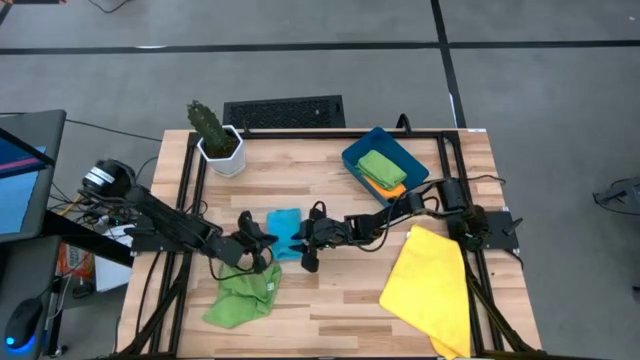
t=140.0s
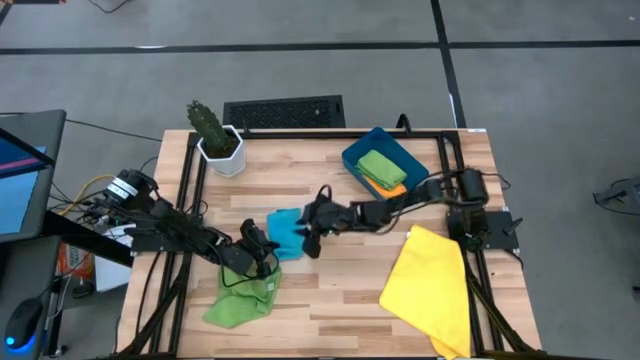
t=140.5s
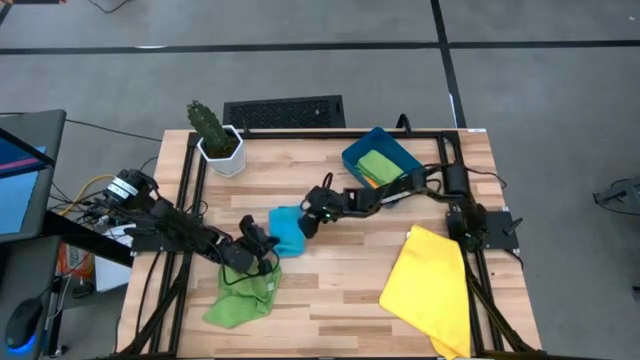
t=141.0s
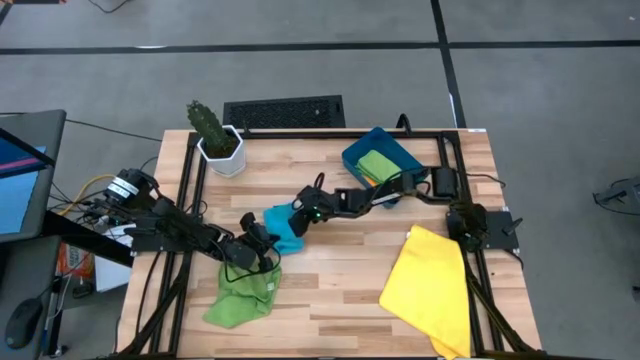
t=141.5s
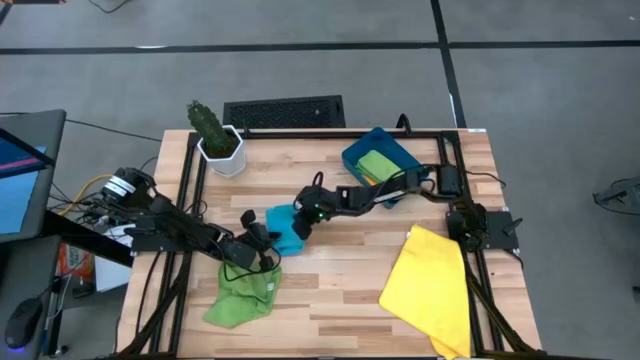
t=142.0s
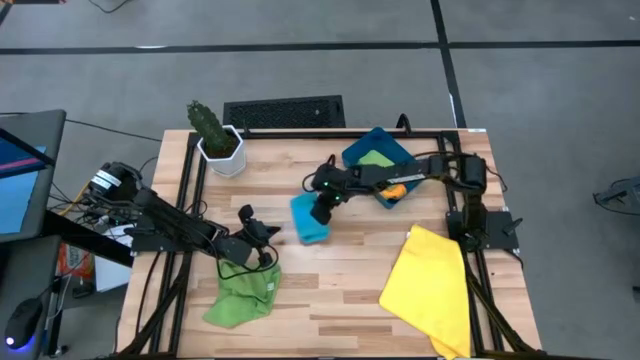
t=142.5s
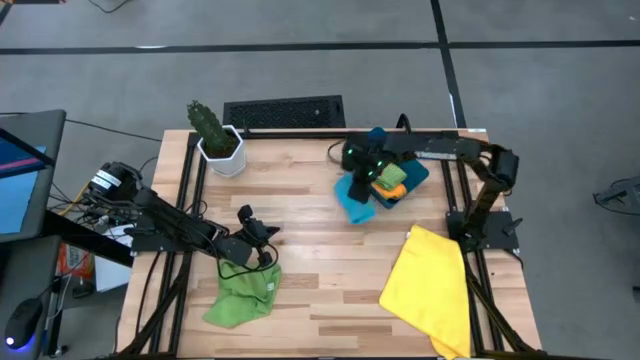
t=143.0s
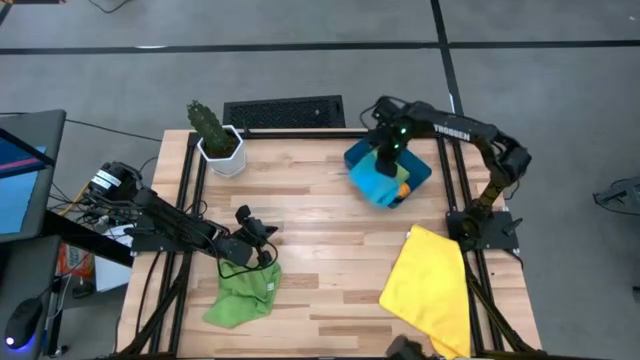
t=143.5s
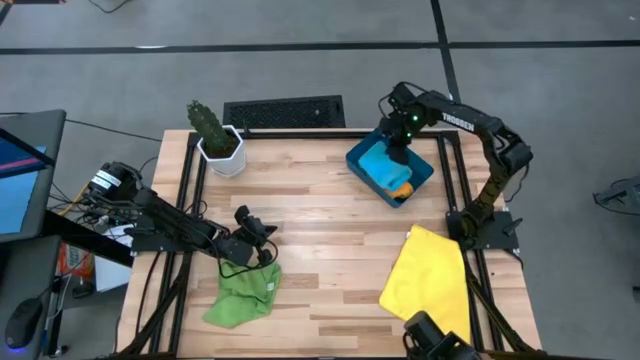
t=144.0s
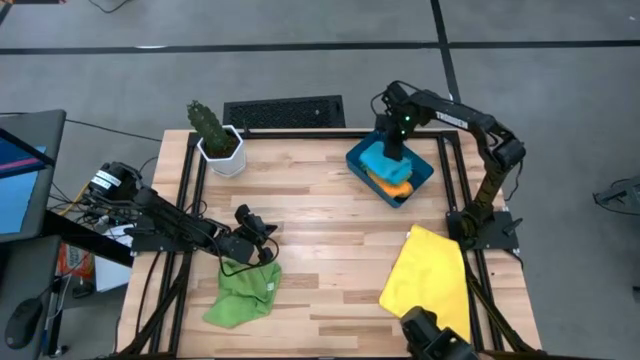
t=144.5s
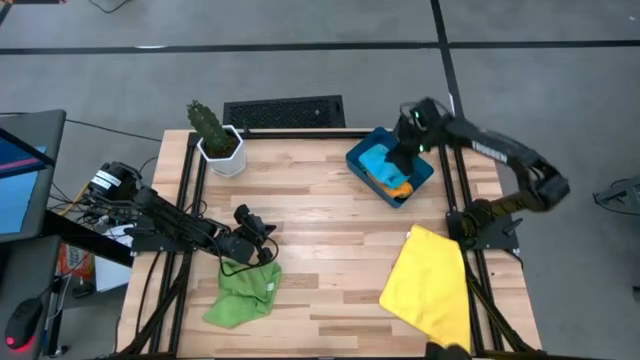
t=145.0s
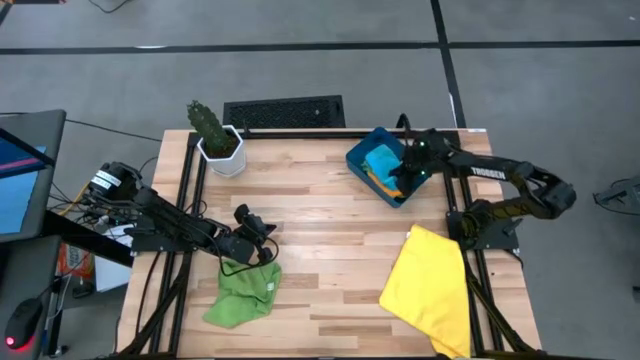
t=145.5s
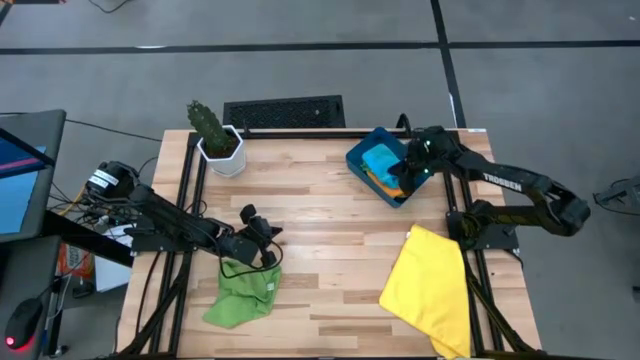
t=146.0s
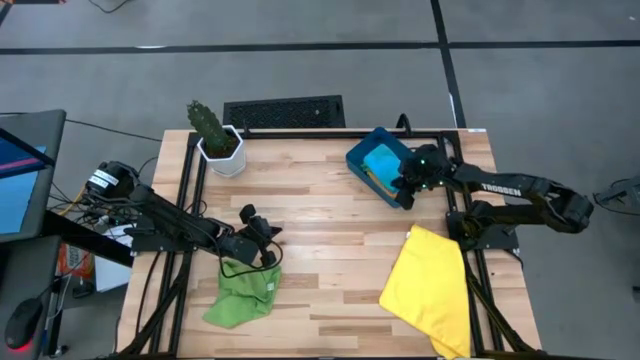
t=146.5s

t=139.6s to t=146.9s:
Task: Fold microfiber towels
Put the folded blue microfiber towel into the blue bin

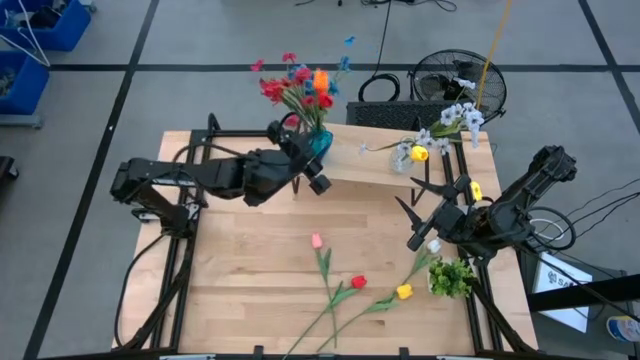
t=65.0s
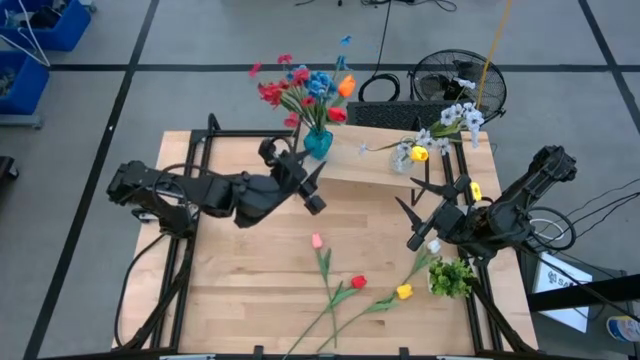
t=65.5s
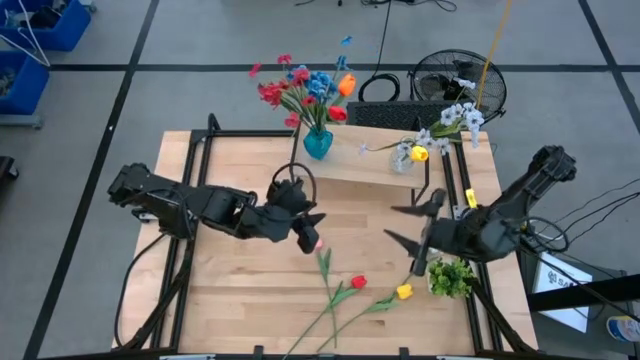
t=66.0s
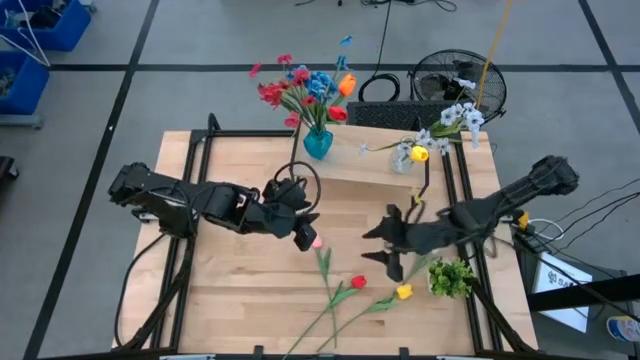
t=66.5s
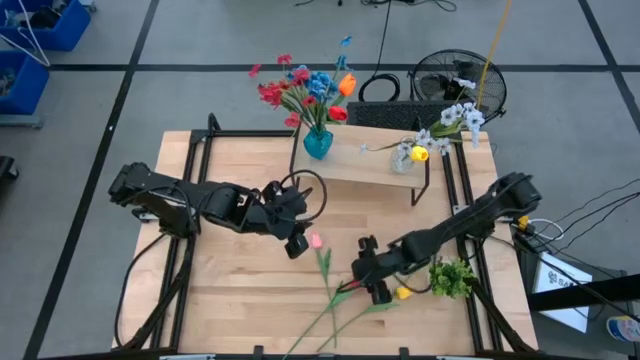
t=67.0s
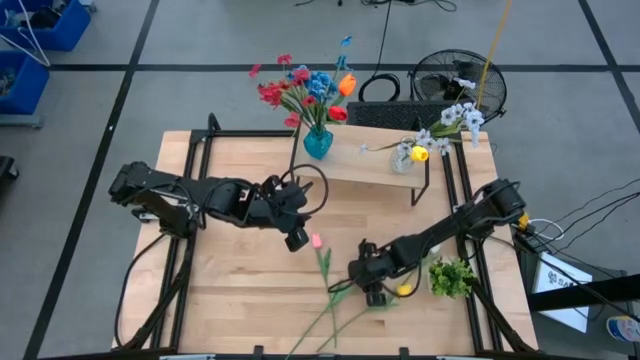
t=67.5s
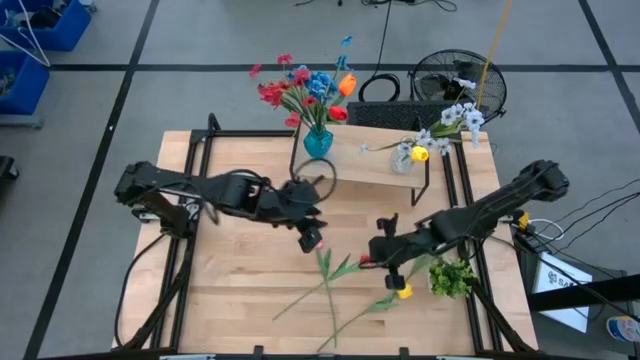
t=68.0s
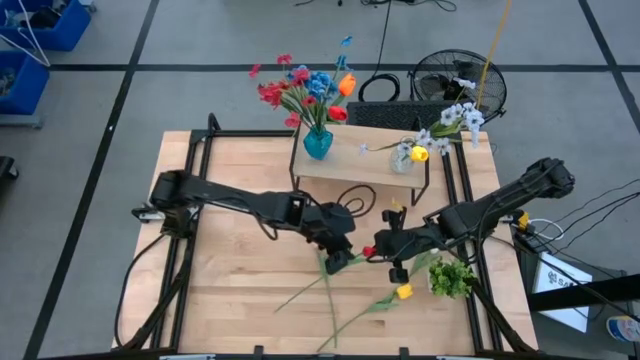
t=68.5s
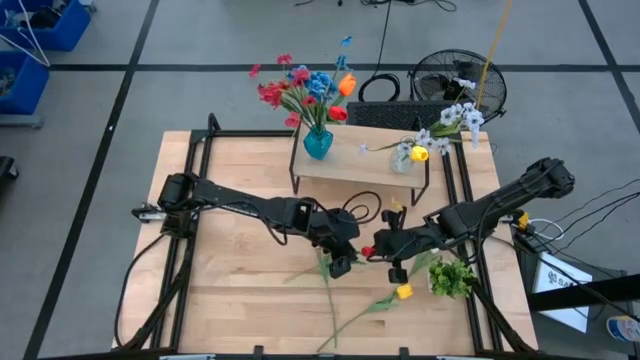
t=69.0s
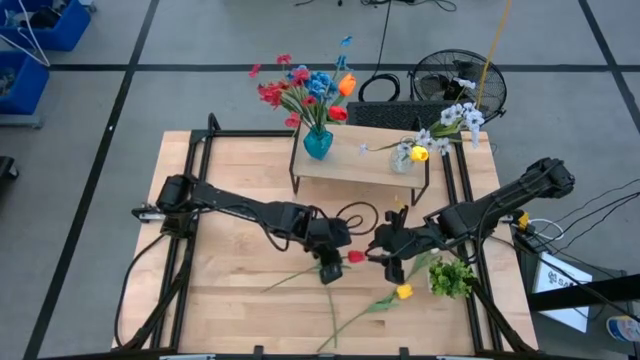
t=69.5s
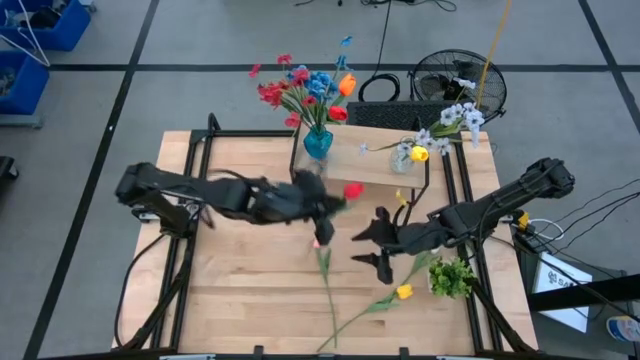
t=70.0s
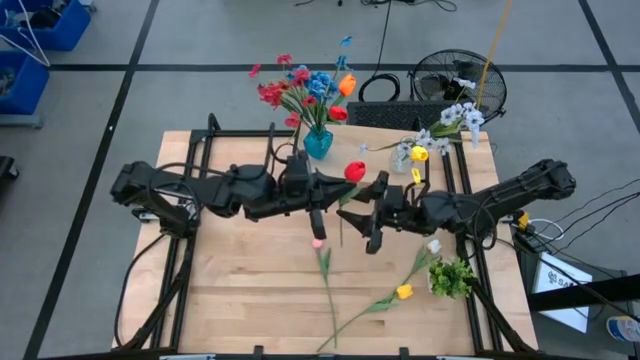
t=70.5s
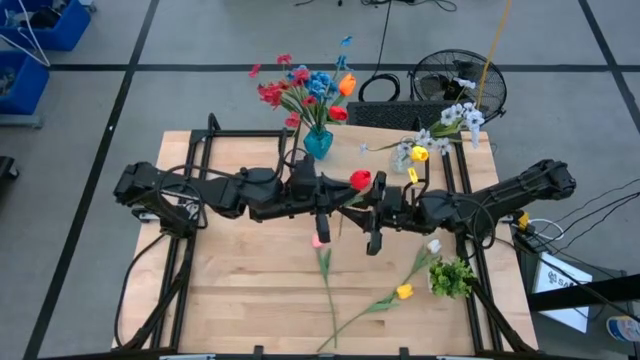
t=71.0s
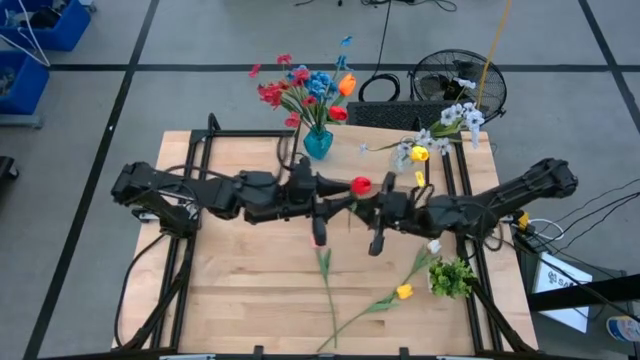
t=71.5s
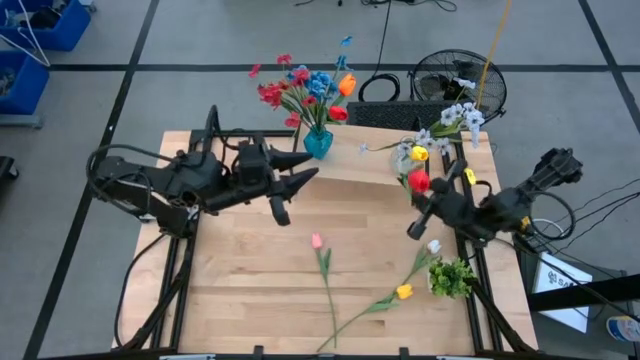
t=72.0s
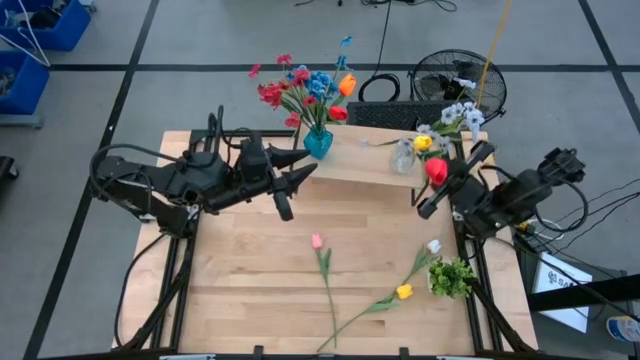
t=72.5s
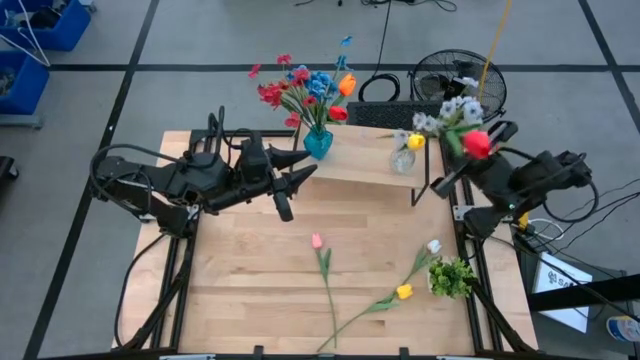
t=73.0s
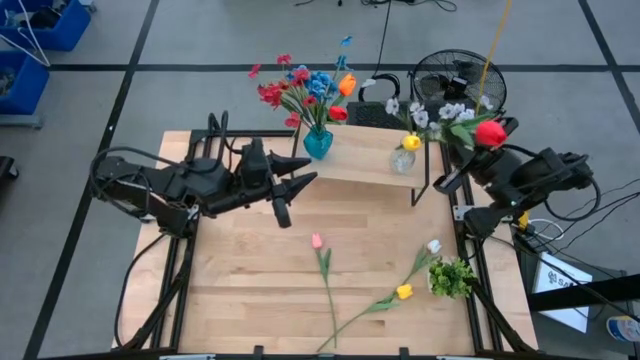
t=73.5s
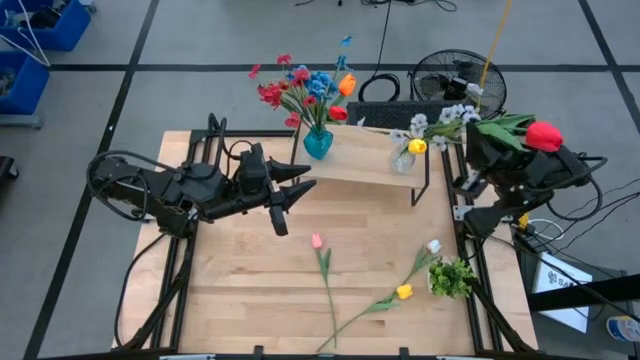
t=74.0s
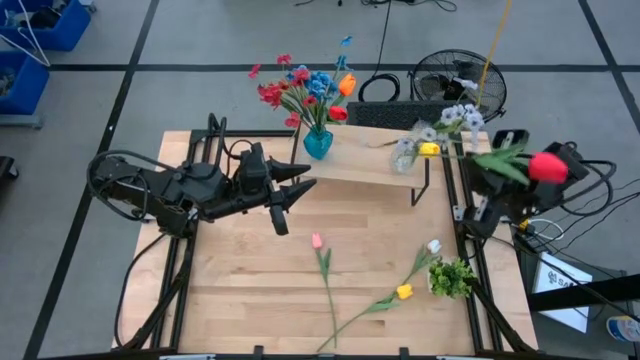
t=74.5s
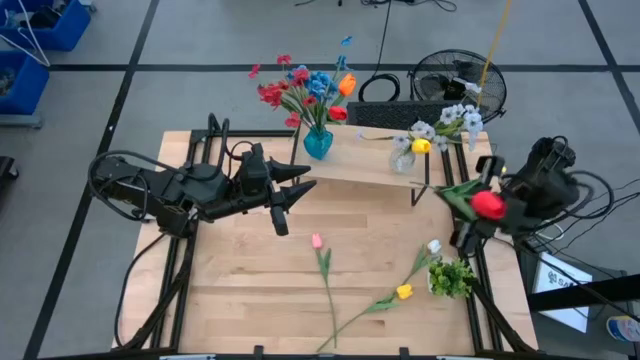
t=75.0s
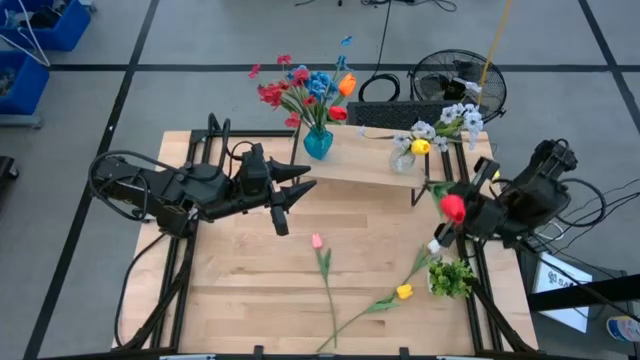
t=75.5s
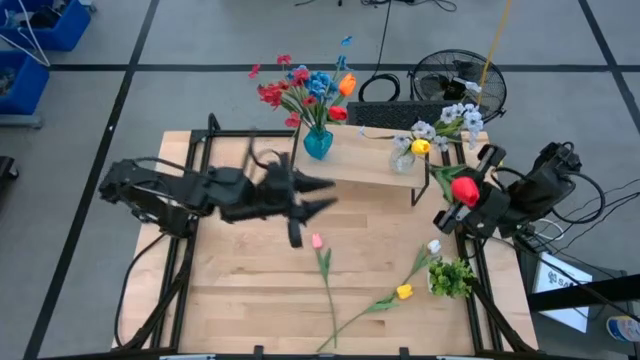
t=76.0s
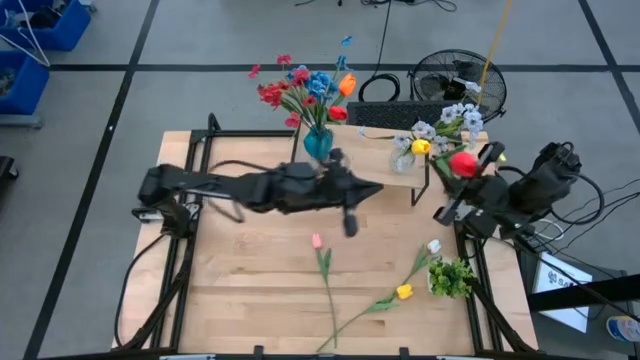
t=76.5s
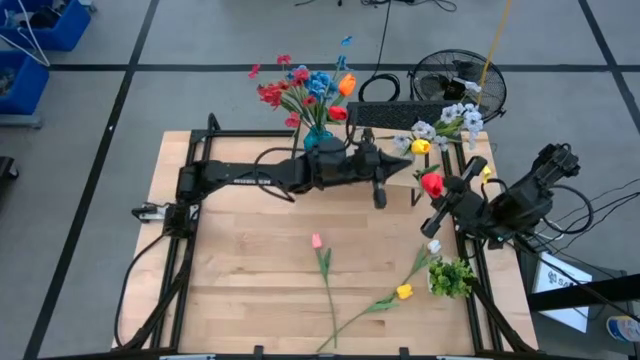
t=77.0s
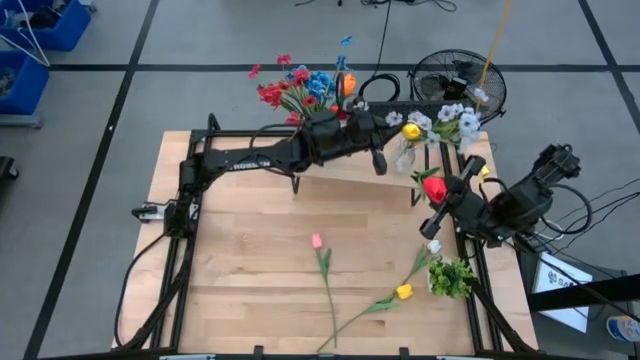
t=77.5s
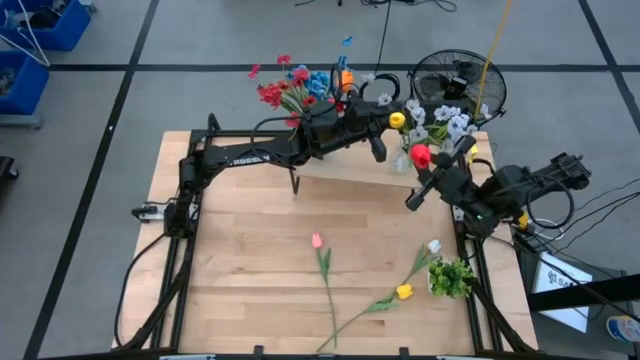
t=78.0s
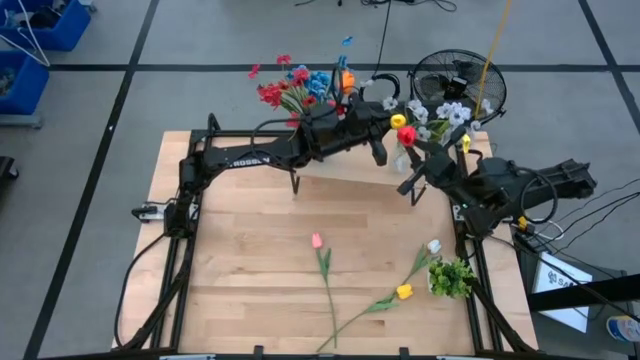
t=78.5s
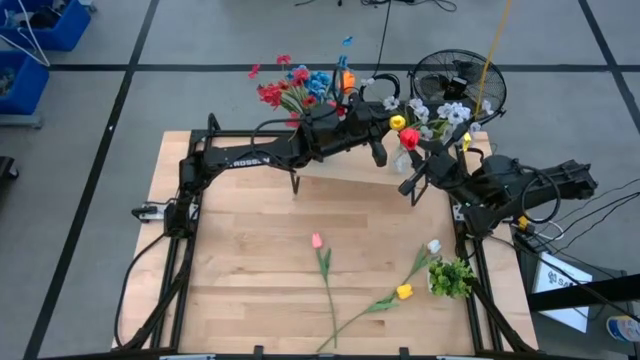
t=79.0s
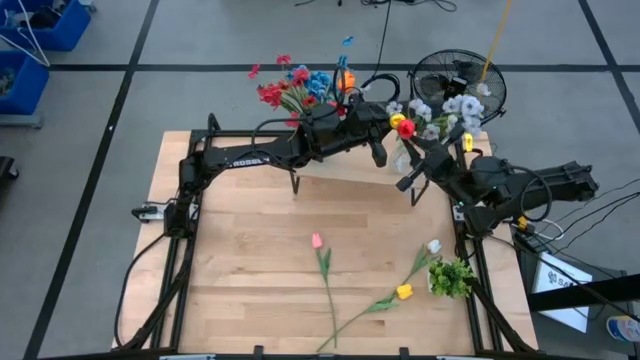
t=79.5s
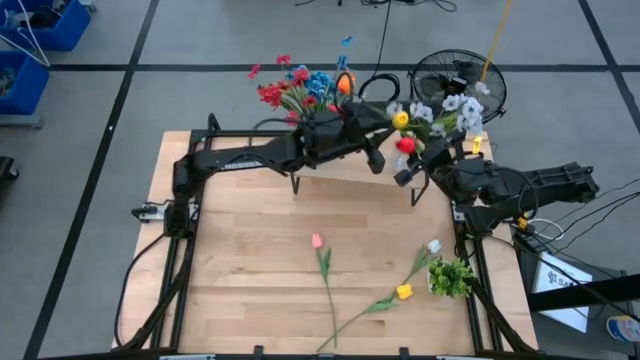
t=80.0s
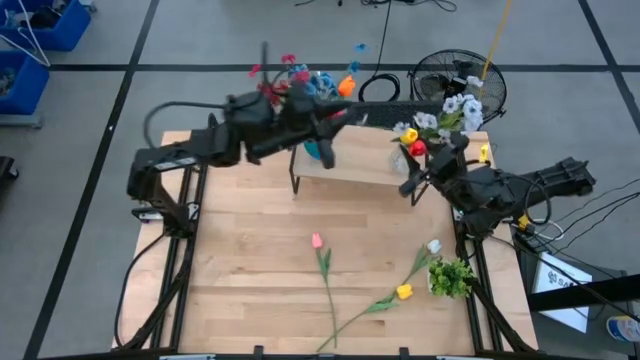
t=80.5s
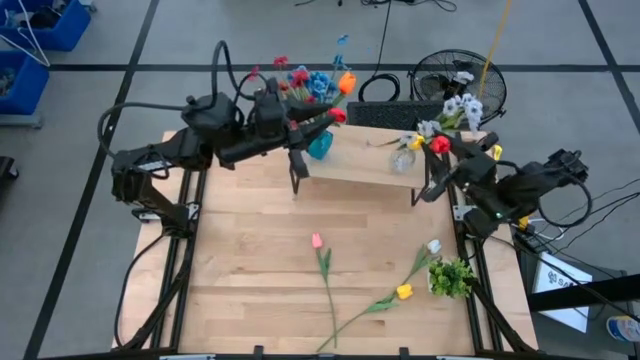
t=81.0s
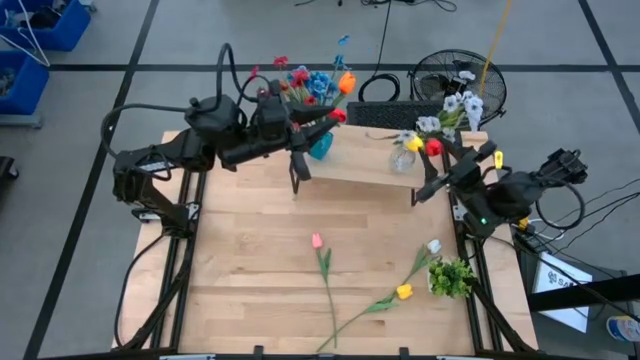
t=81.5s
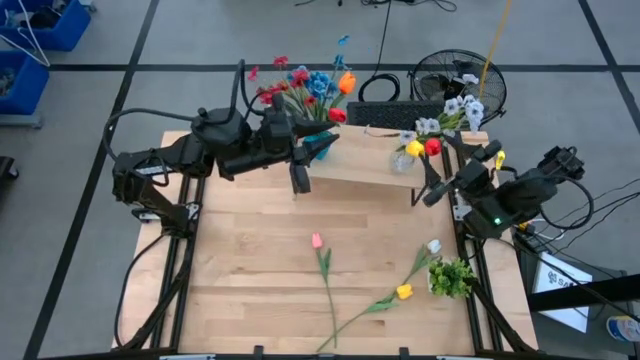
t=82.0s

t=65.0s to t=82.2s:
Task: Pick and place flowers into a vace then onto a shelf
Put the red tulip into the transparent vase on the shelf
